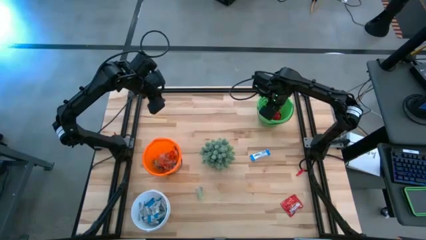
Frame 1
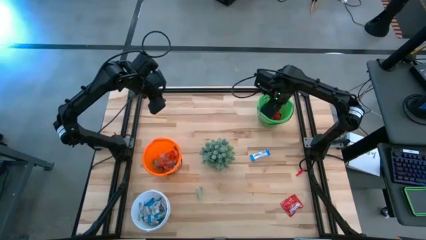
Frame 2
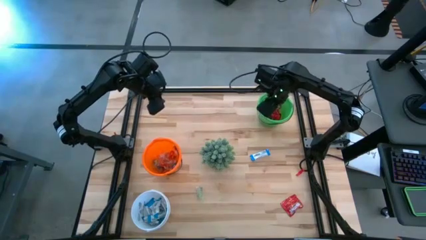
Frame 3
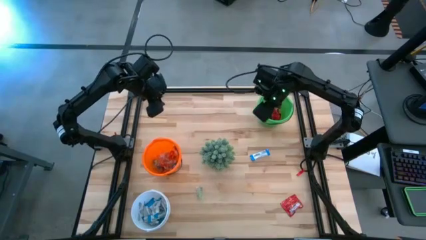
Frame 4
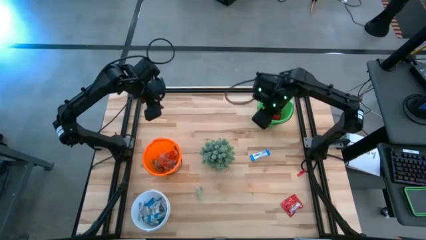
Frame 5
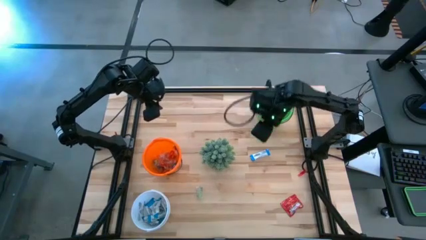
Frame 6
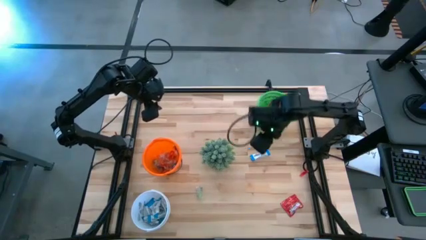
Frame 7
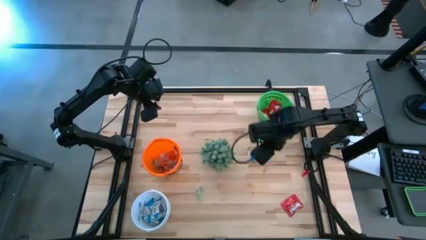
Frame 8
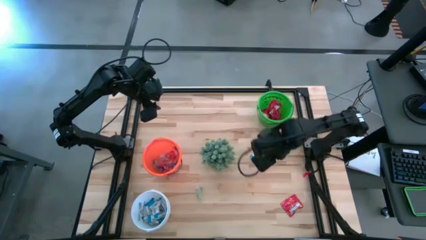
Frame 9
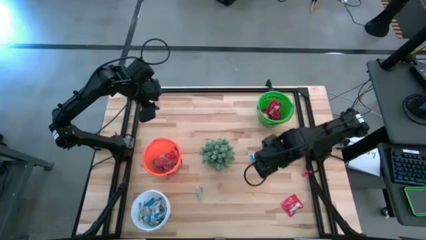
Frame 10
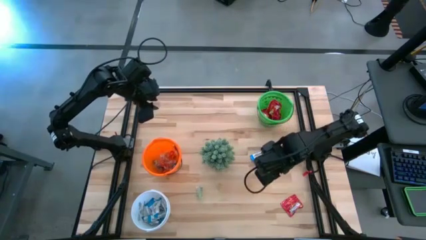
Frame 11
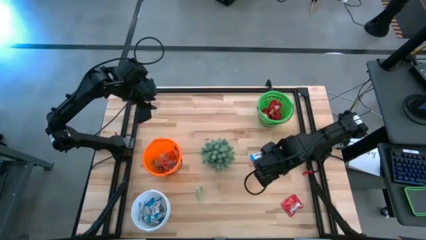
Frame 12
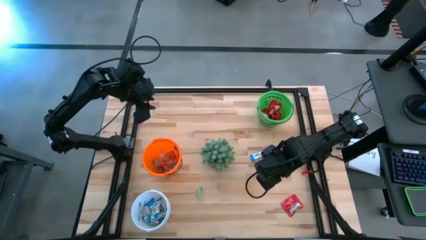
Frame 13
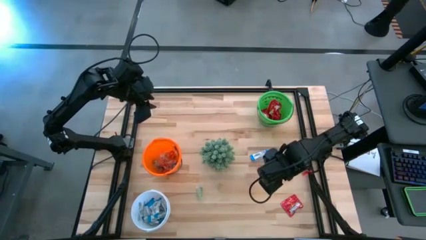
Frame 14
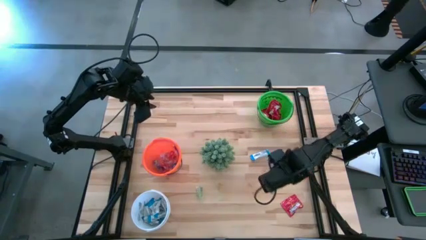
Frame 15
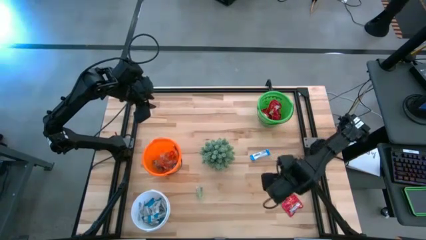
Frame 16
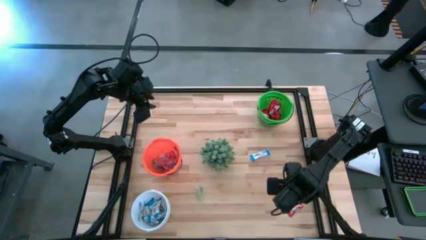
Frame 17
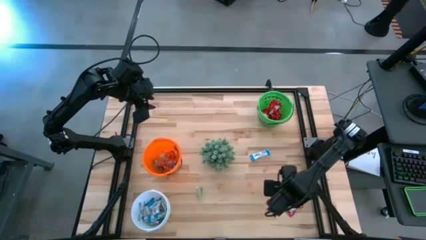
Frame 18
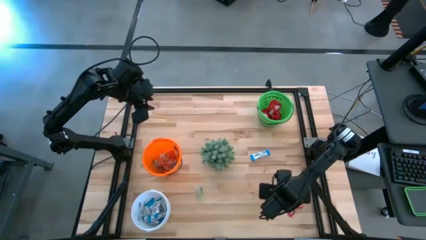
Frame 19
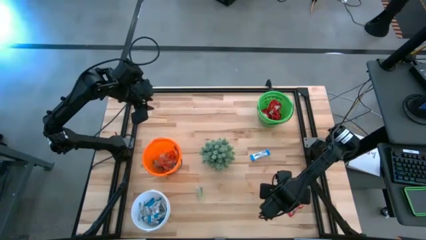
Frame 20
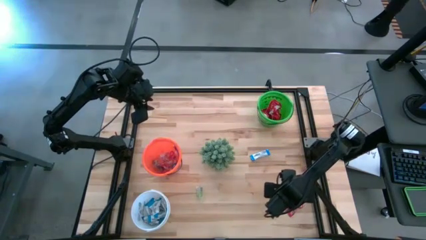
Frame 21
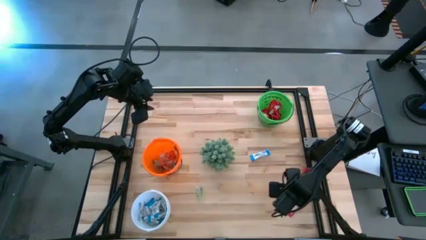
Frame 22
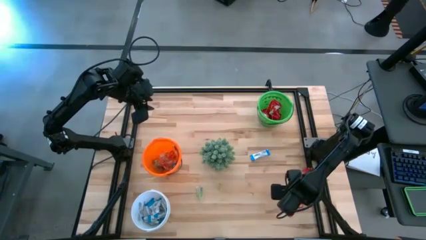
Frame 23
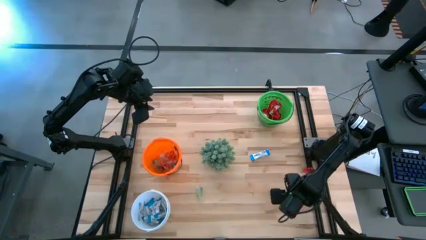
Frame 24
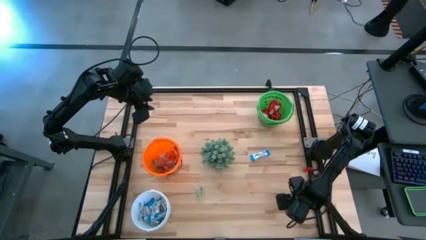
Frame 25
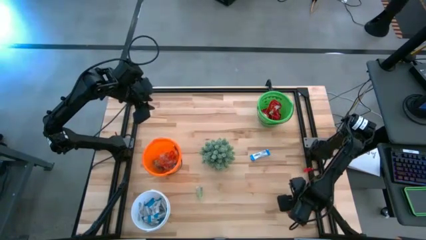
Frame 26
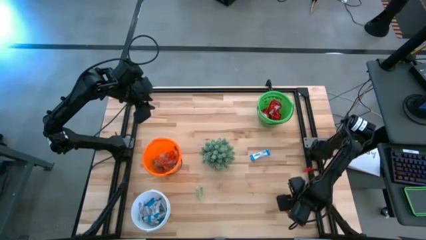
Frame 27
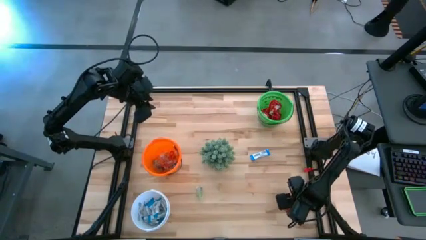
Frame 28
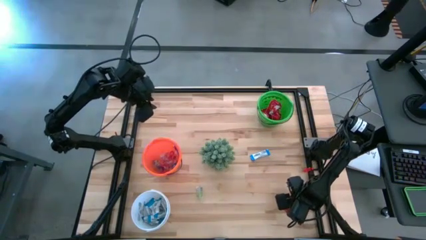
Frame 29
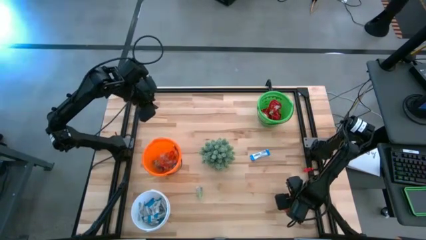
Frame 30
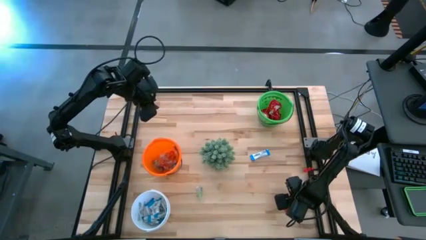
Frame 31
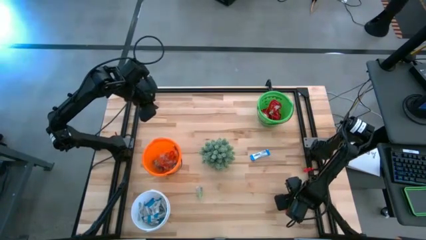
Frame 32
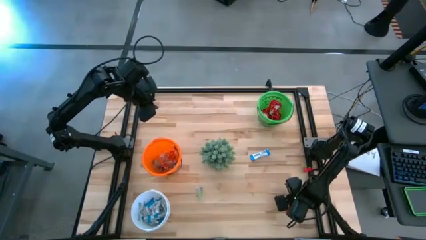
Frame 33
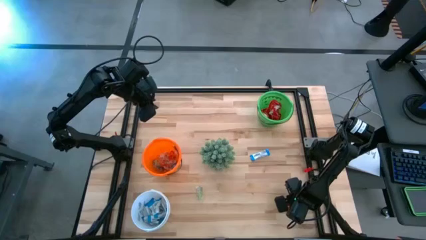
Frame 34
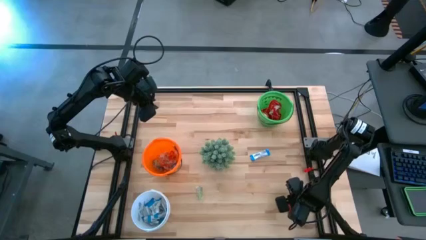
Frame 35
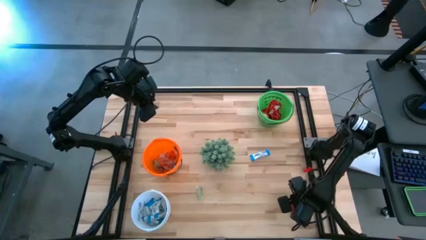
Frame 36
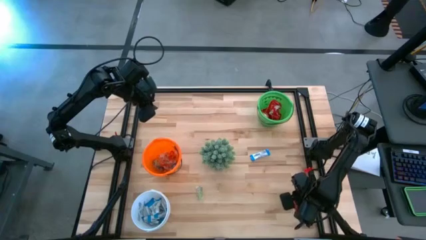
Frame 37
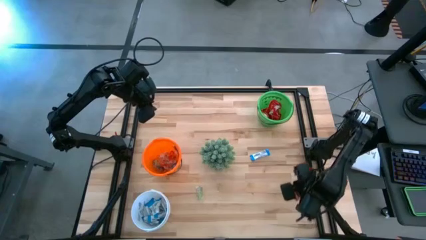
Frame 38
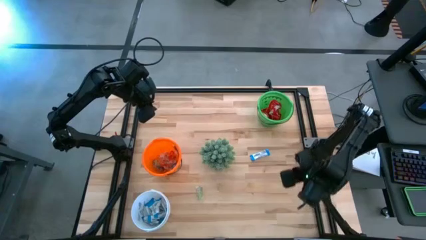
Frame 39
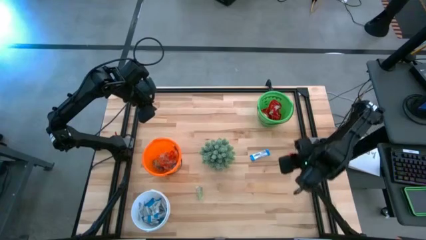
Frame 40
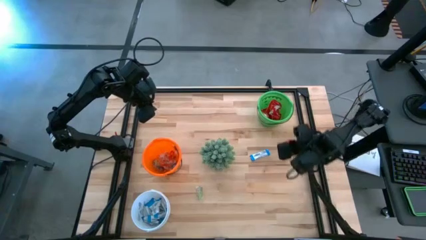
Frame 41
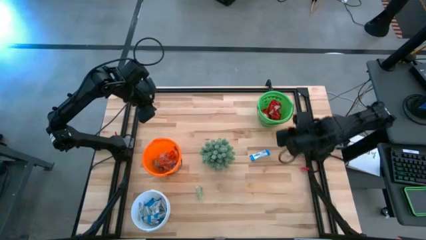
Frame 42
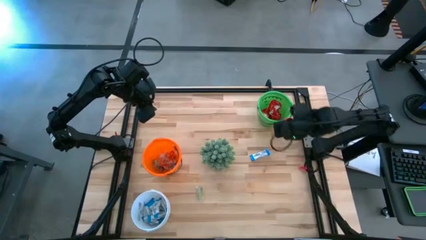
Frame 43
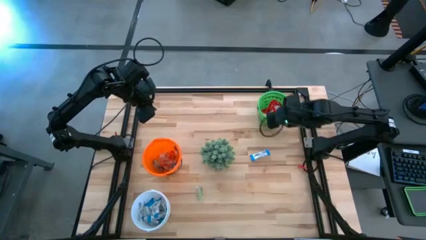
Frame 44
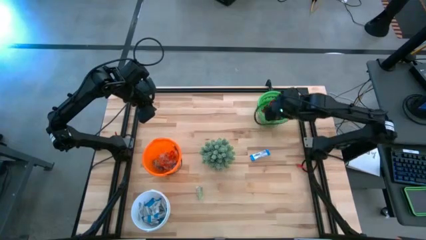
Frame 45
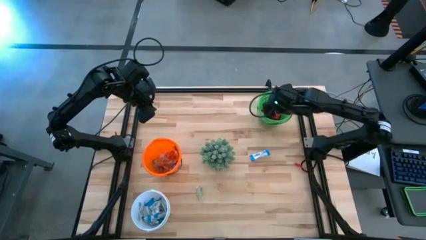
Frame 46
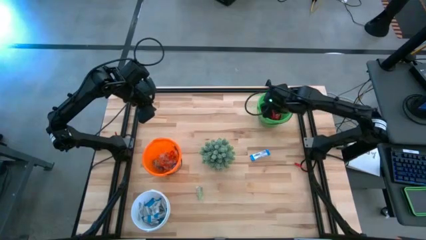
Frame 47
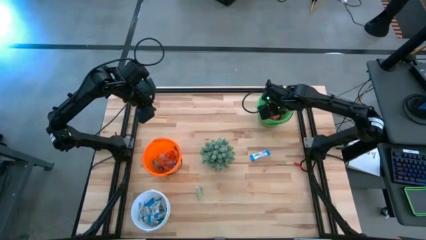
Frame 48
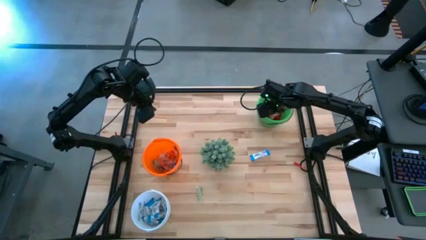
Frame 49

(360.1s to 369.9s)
Task: Sort candy
Put the red candy into the green bucket

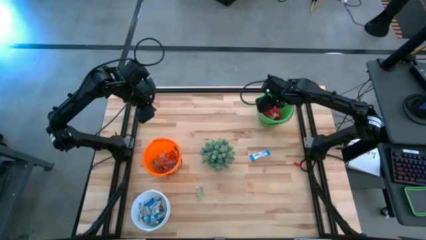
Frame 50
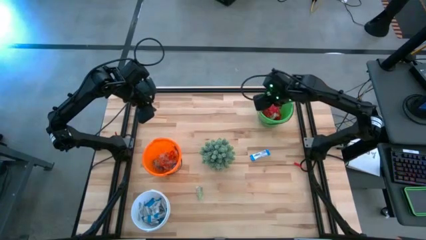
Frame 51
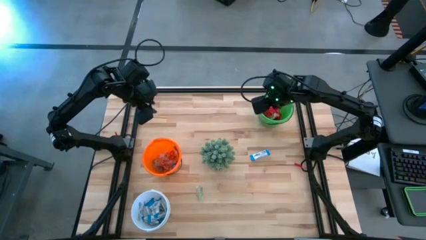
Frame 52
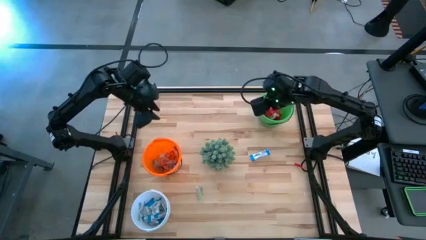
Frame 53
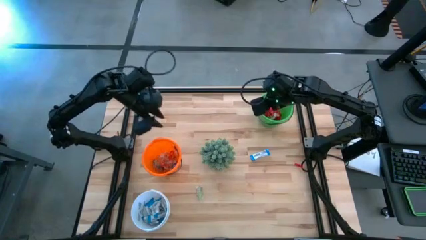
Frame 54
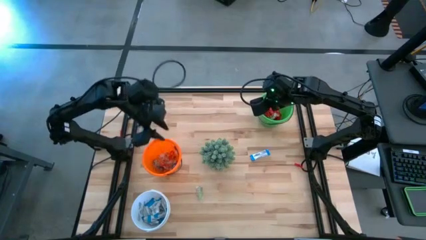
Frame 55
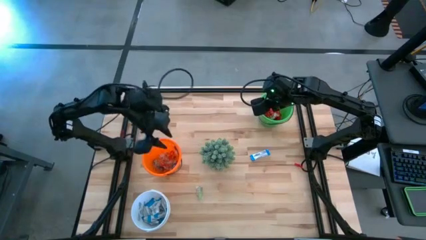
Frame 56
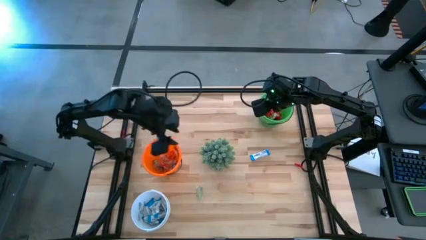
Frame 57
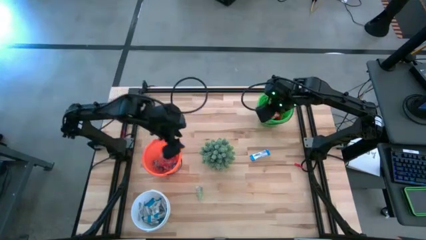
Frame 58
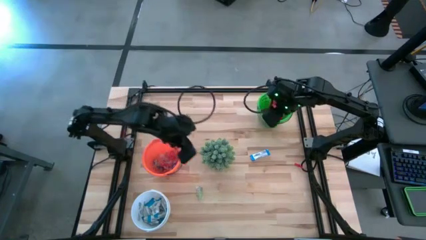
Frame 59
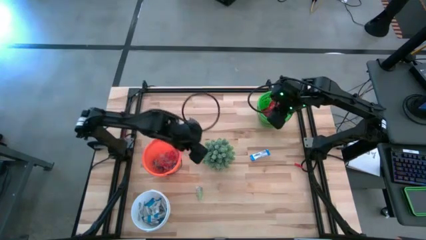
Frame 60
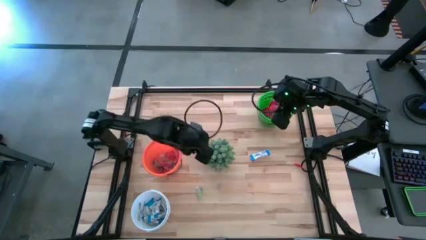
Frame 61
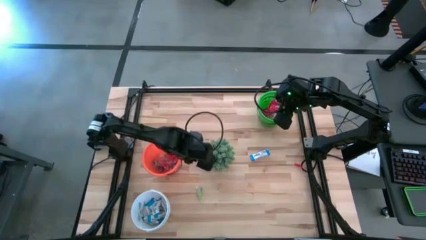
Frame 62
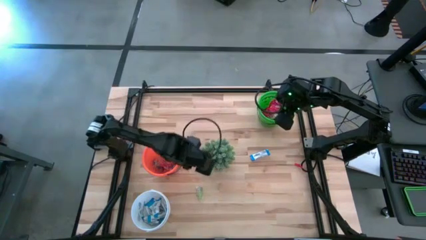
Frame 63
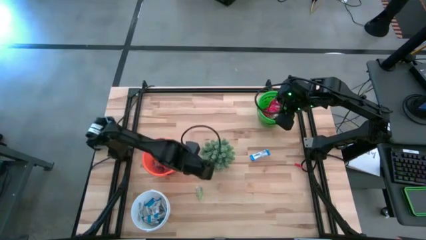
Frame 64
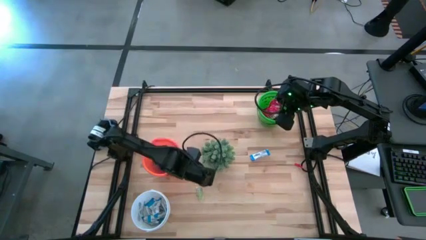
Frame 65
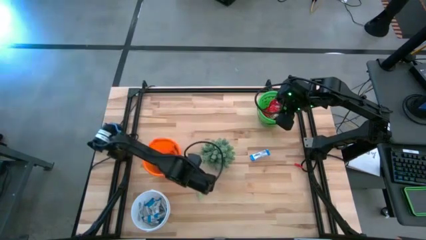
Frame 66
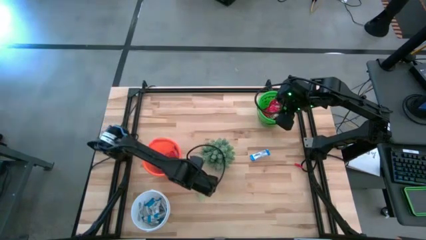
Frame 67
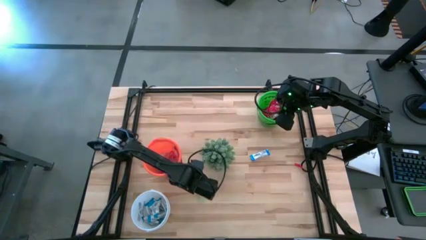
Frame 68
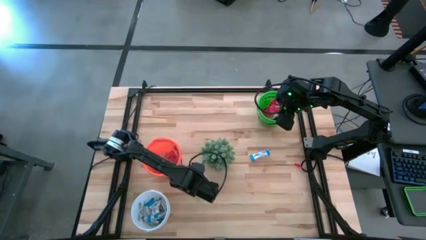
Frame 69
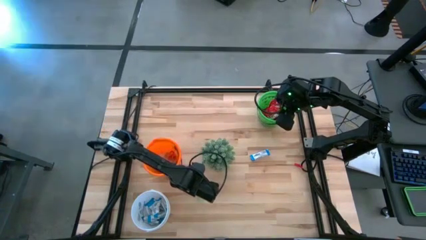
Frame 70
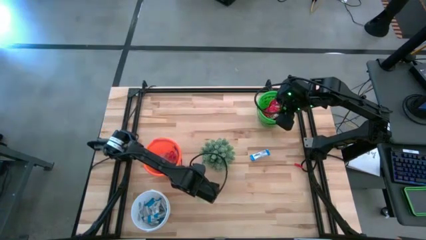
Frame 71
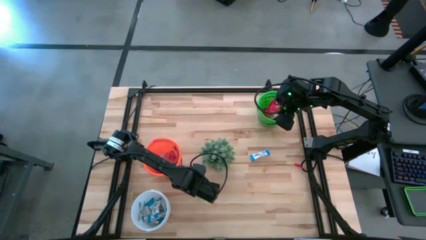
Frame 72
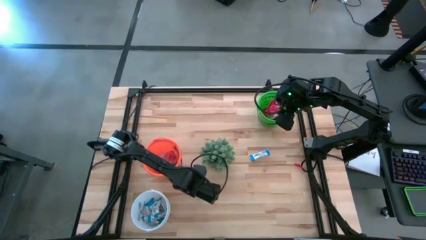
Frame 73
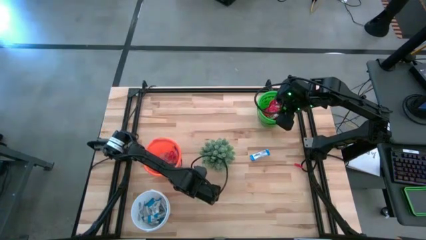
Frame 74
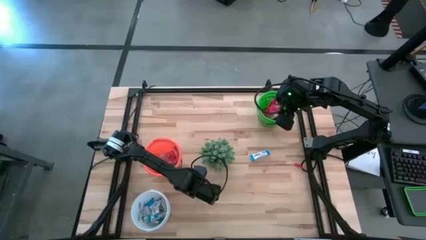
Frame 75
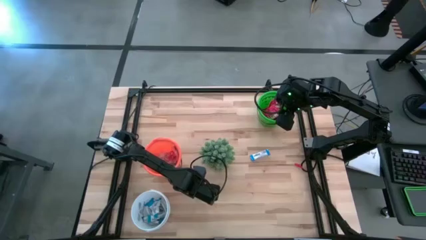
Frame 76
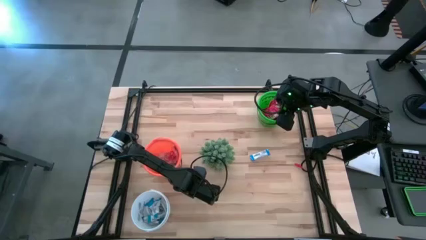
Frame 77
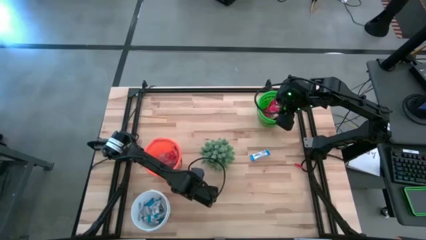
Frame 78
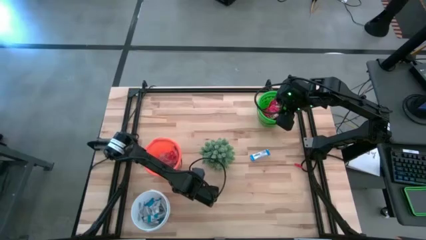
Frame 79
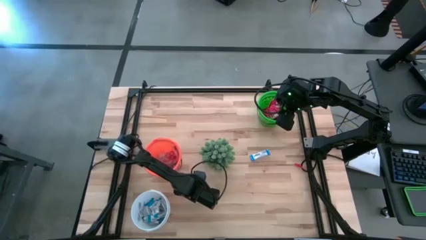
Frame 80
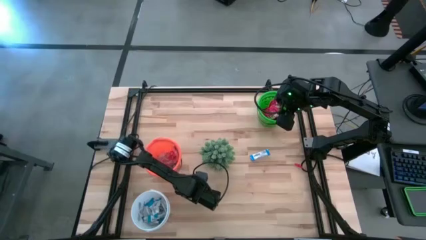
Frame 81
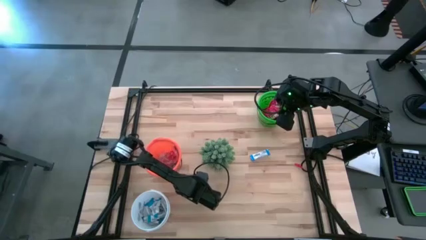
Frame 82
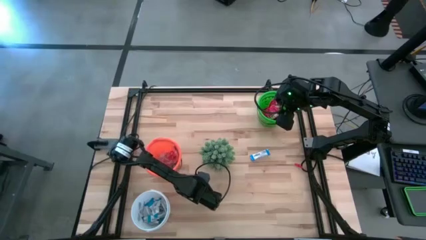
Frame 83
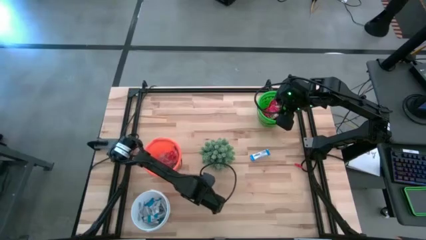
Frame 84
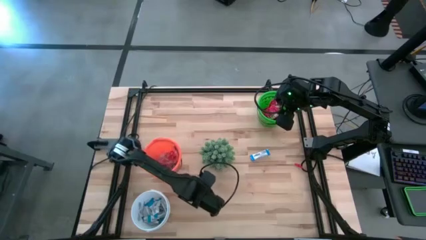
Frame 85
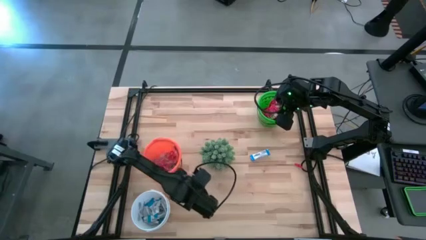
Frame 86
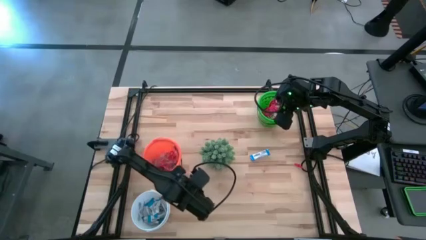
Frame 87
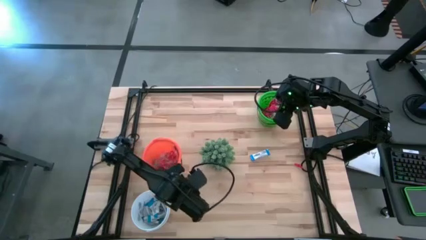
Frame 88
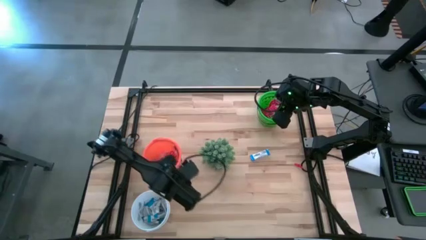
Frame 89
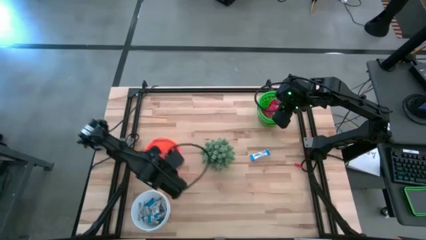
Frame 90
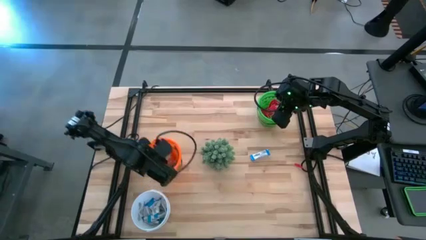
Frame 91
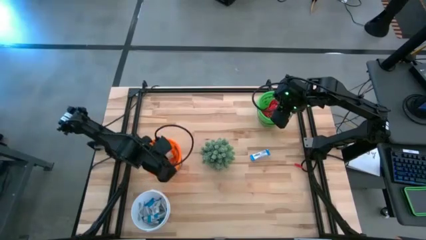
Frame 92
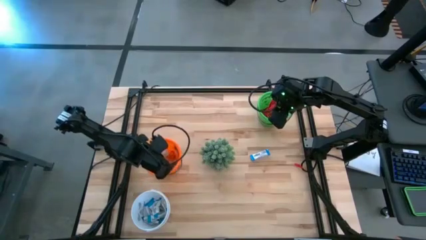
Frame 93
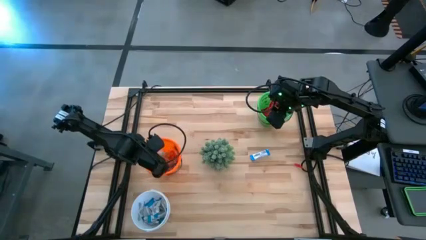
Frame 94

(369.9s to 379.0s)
Put the green gummy into the orange bucket
